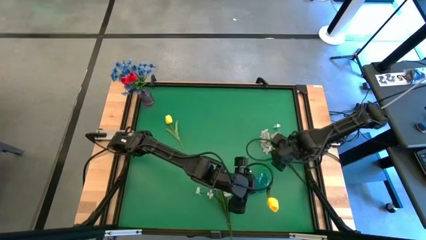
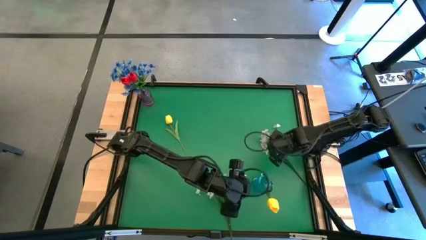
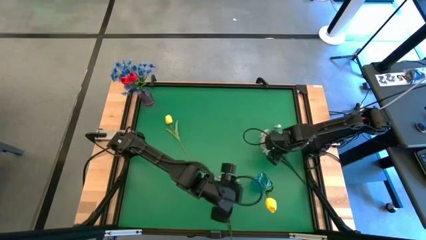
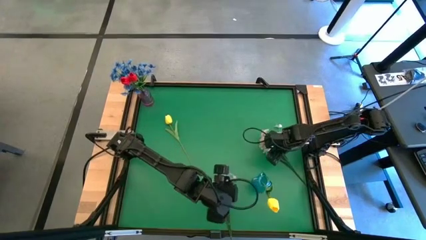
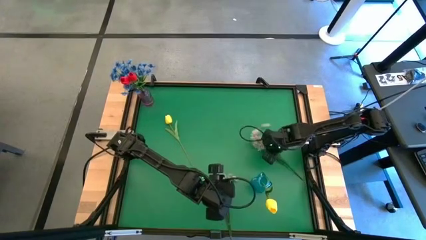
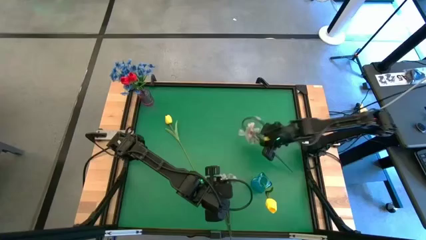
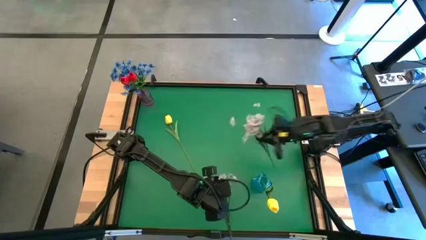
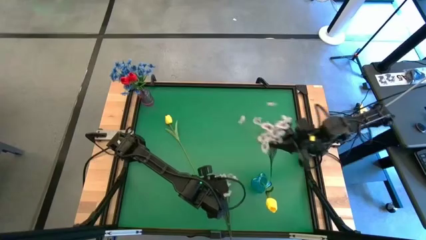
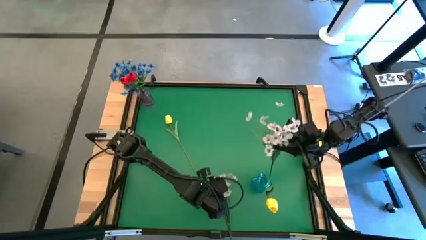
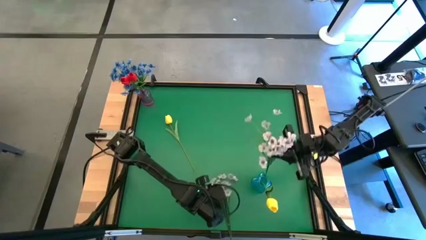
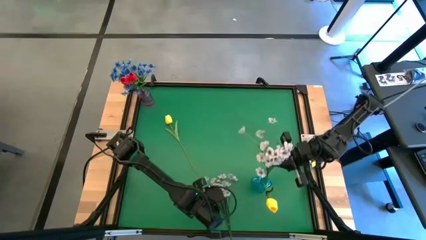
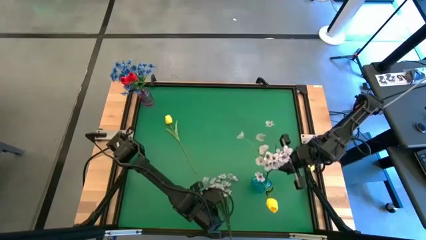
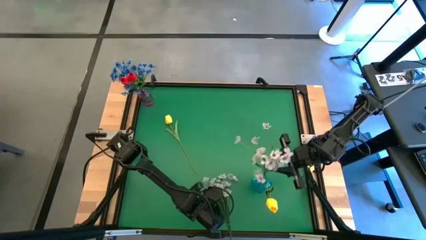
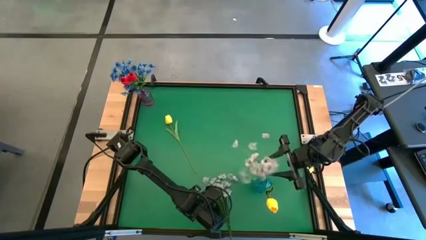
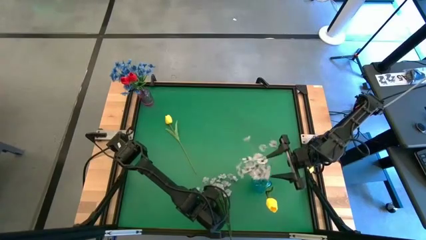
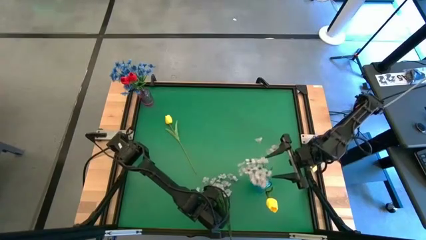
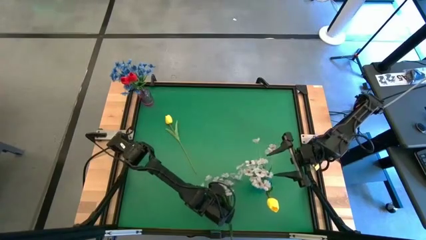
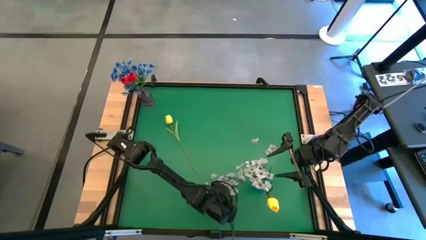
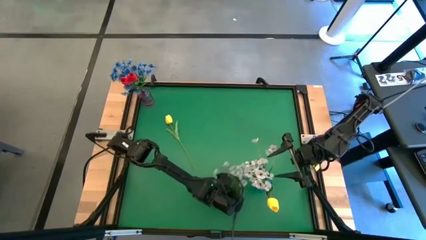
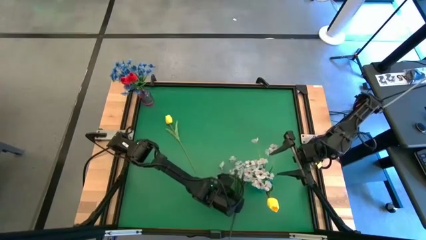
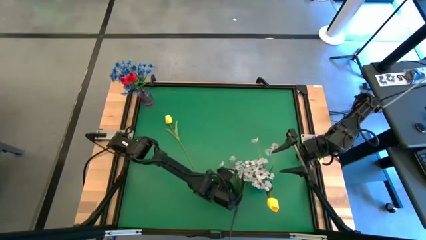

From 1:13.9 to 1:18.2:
Task: Sort flowers into vase by color
Put the top white flowers into the blue vase

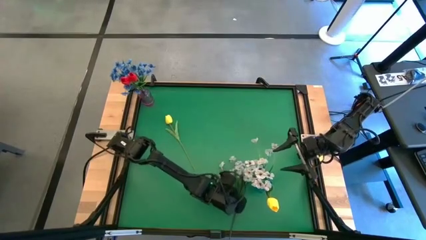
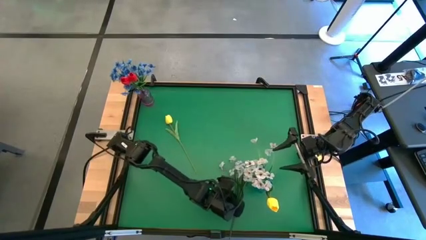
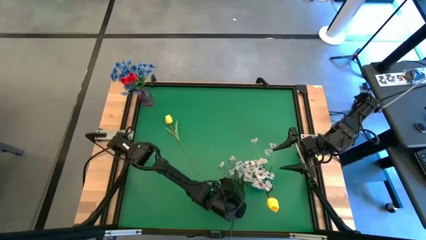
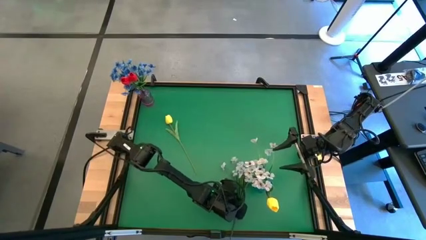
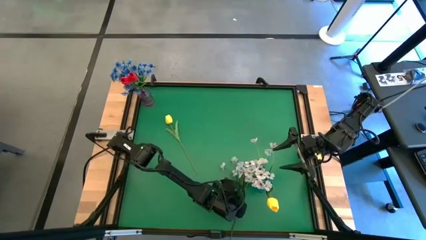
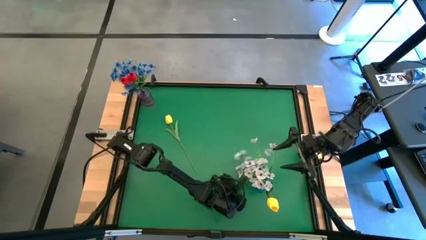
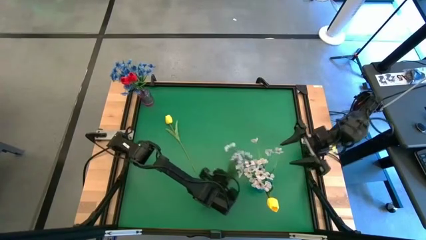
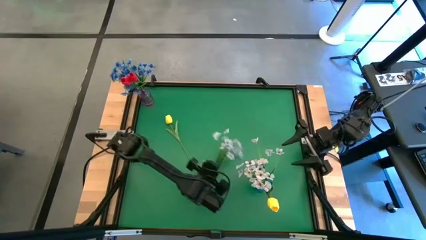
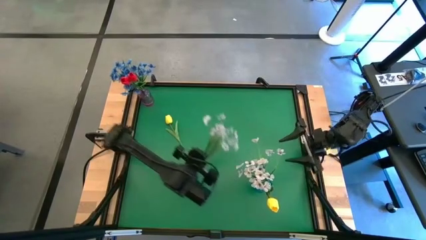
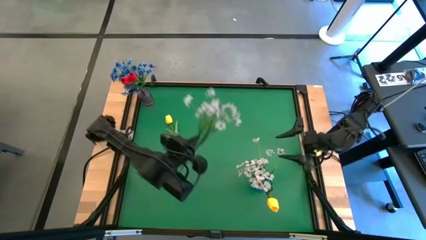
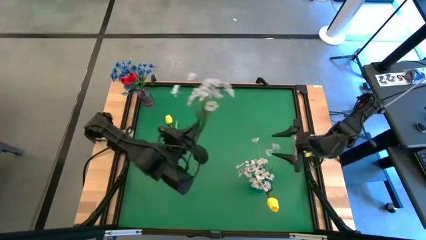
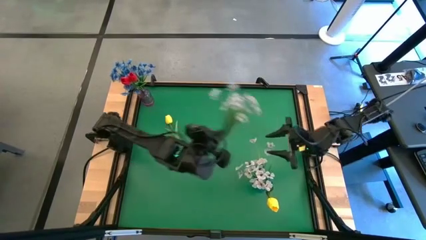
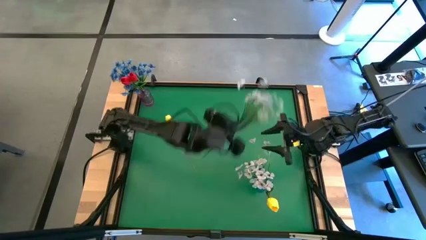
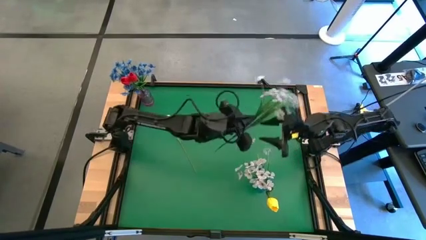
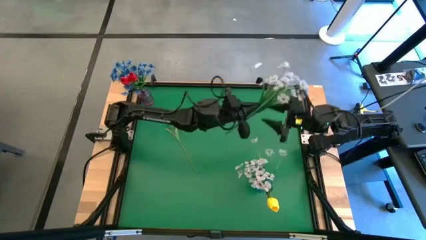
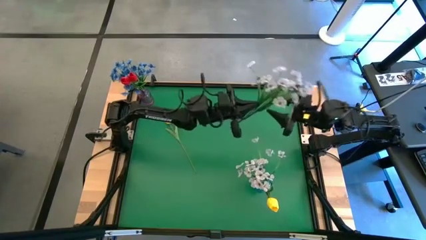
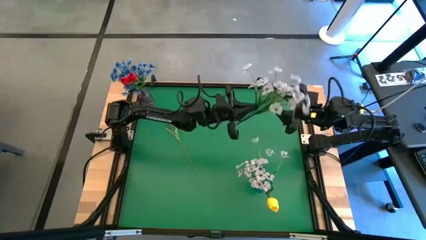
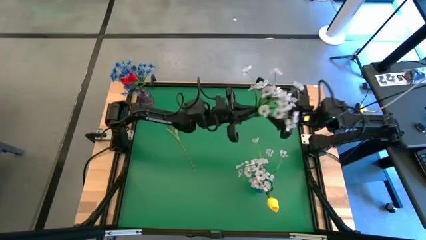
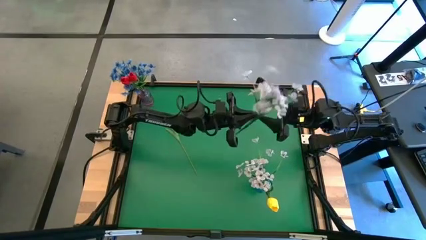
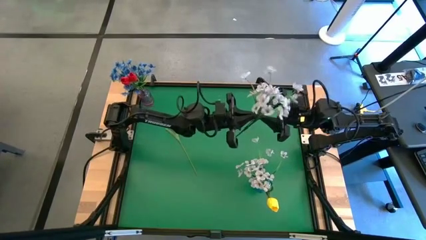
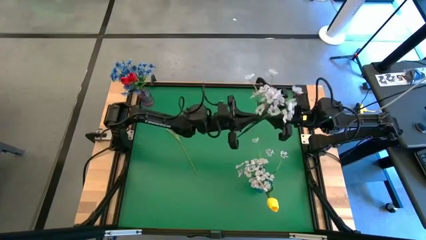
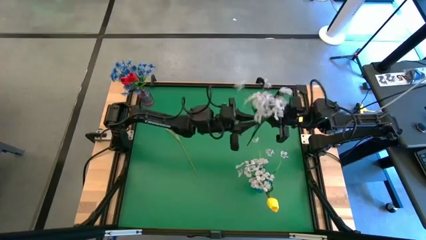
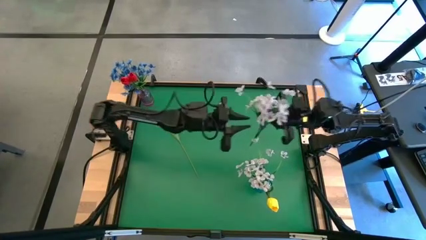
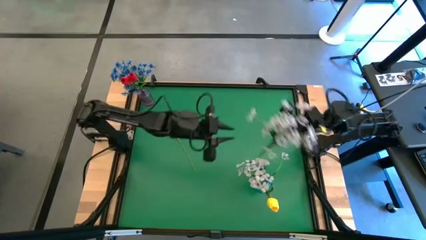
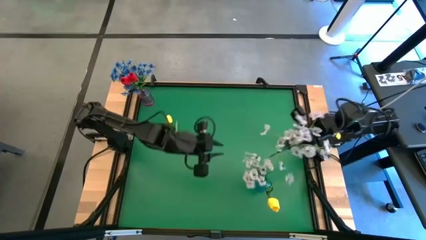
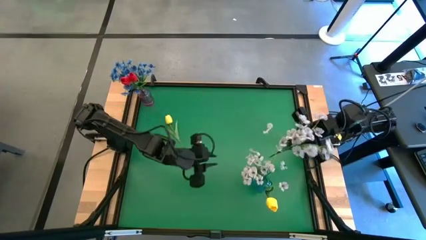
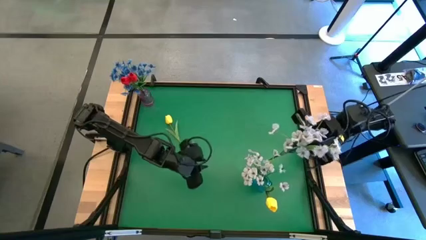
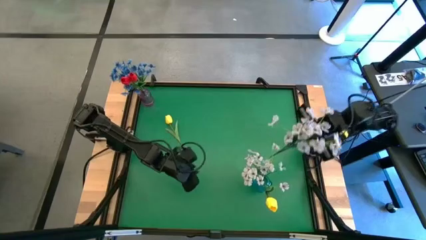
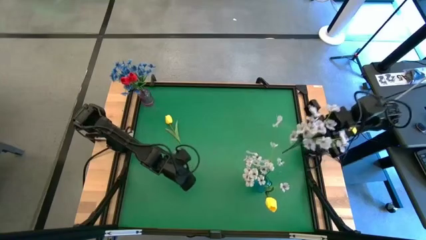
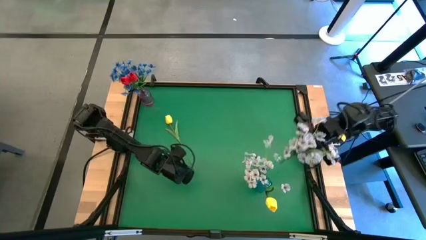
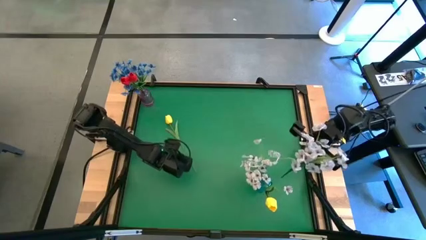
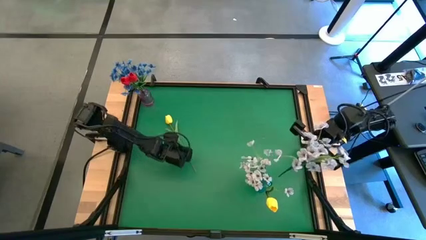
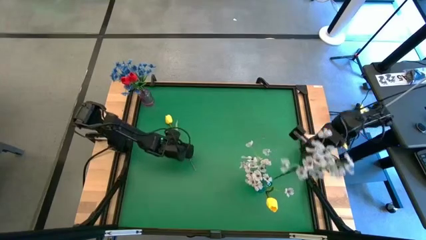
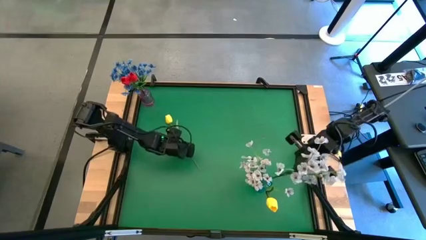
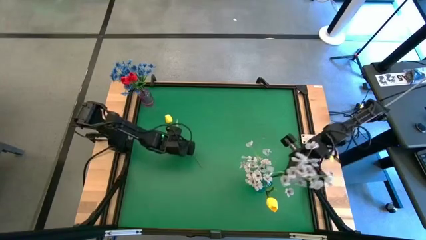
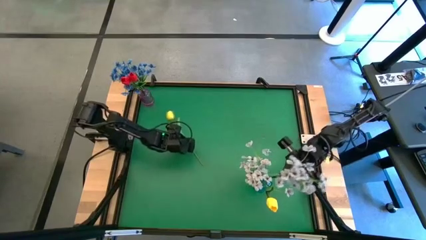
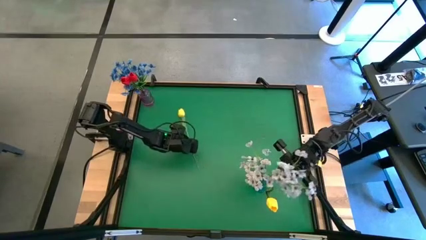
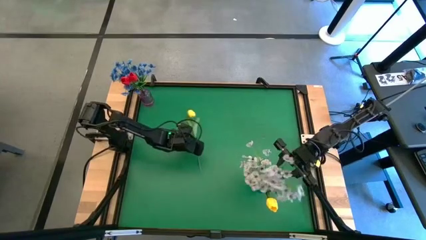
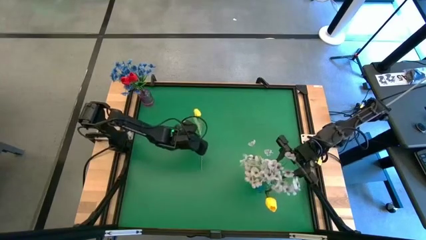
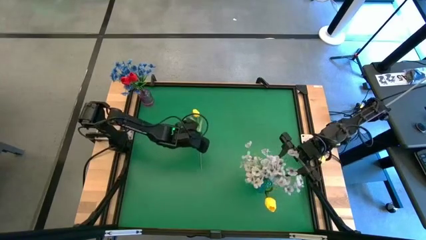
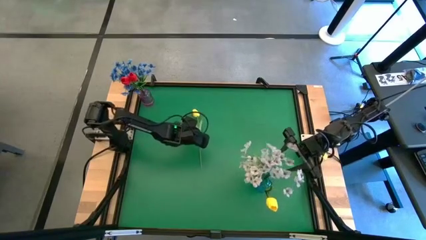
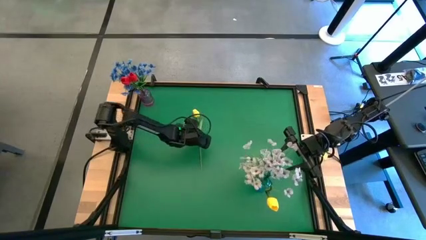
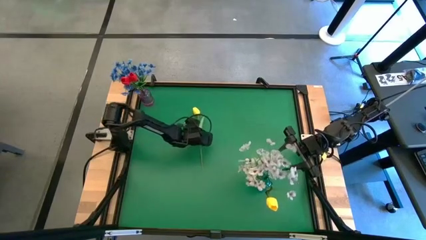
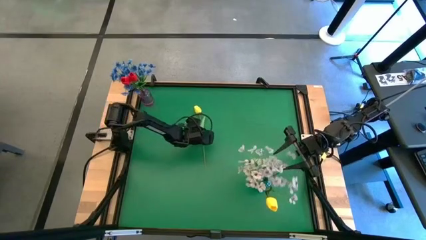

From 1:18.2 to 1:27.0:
Put the white flowers into the blue vase

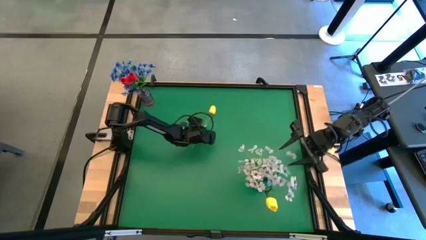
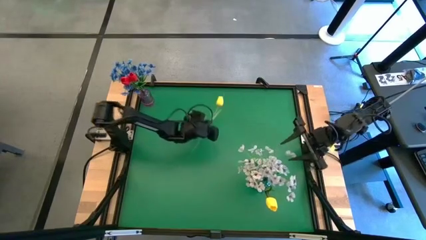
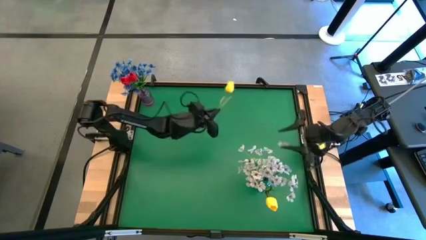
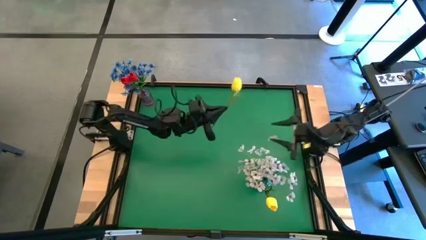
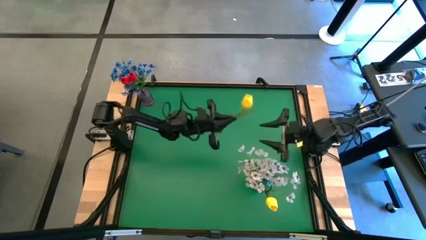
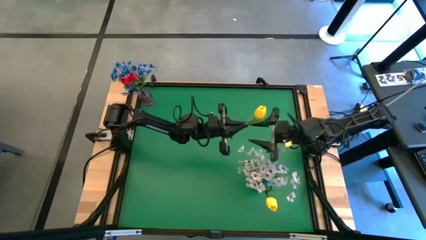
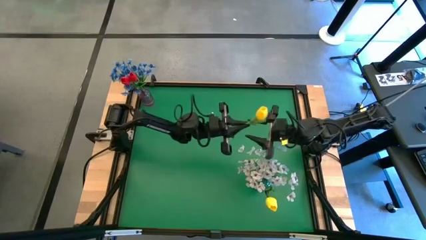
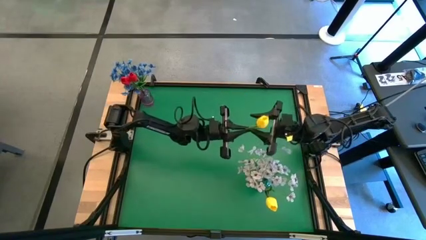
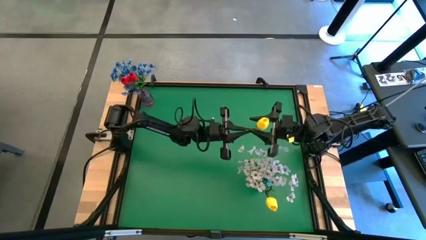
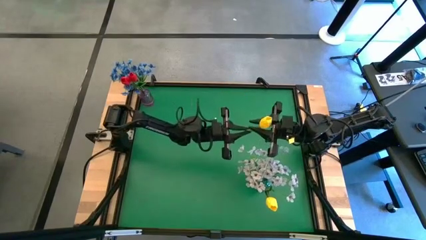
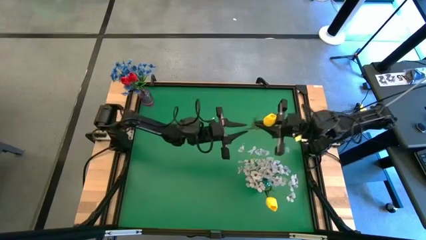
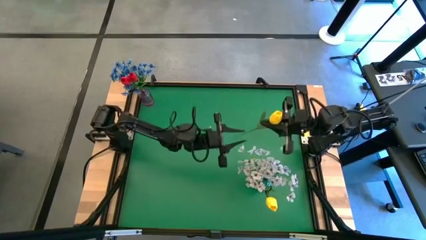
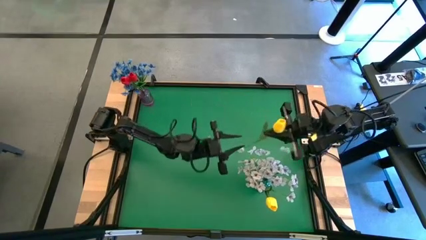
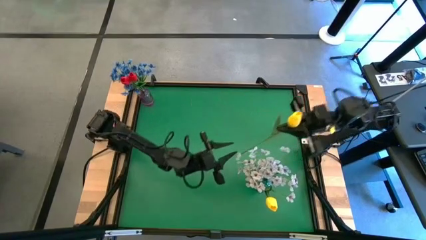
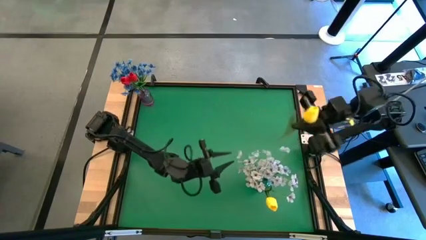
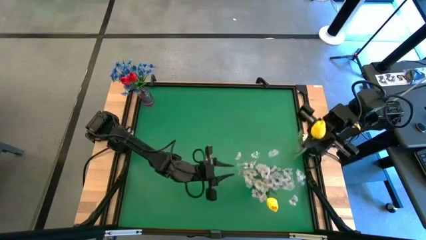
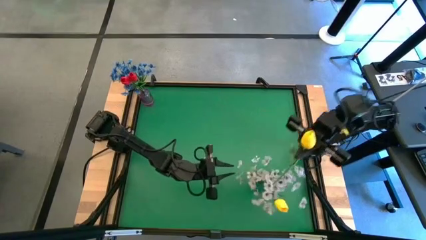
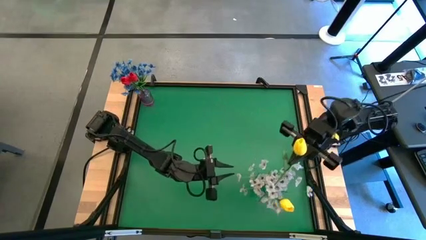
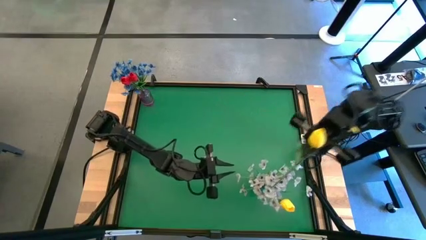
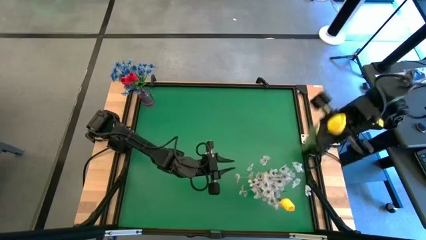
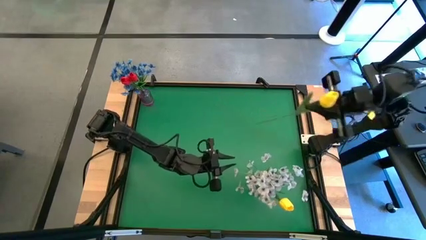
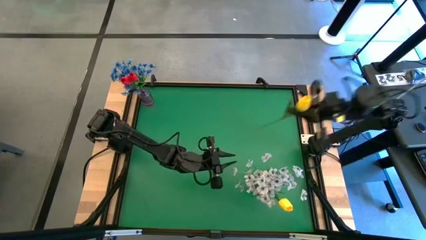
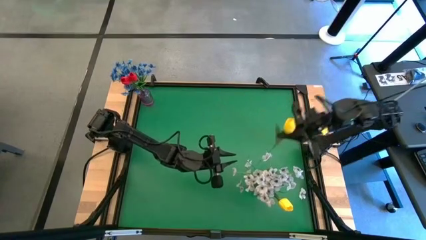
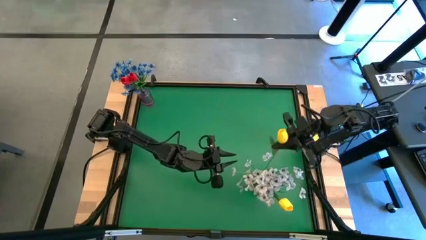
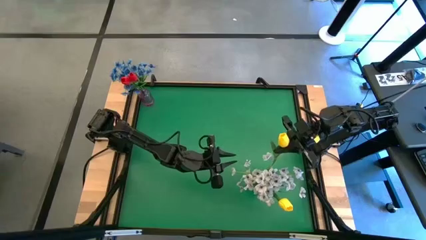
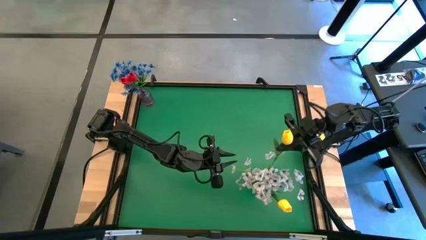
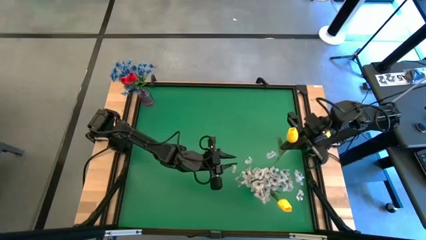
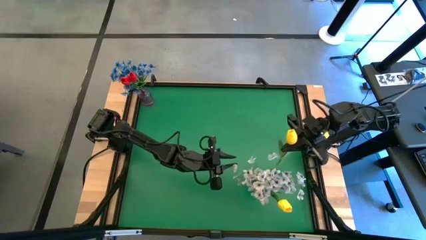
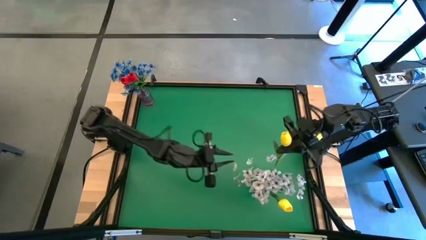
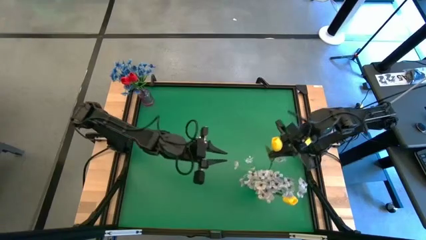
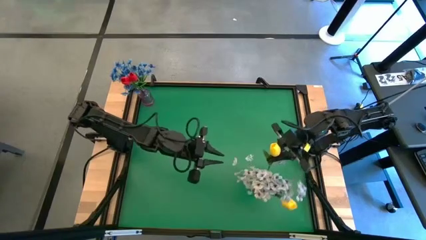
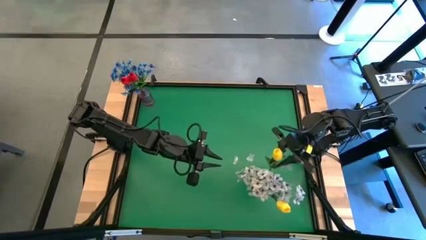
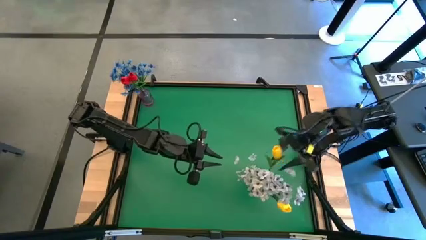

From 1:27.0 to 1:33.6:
Put the yellow flower into the blue vase
